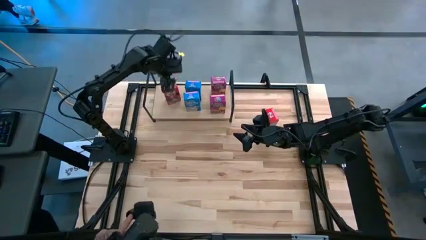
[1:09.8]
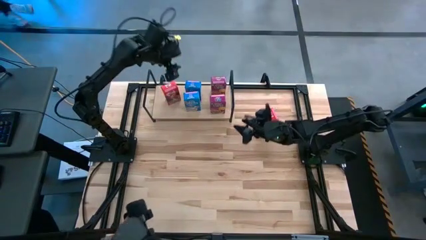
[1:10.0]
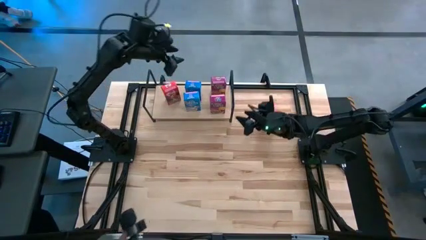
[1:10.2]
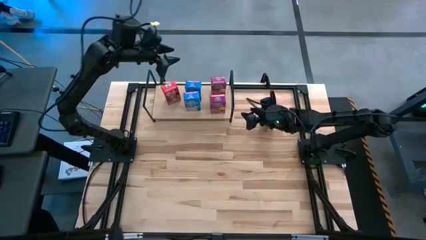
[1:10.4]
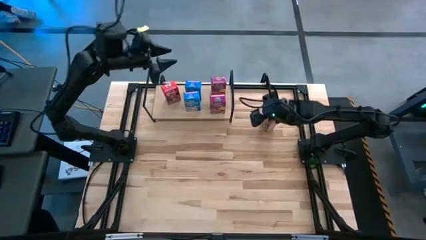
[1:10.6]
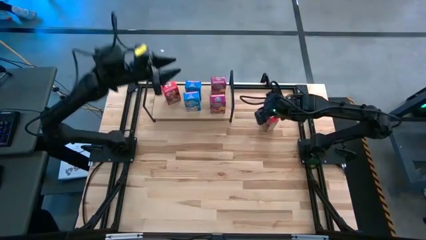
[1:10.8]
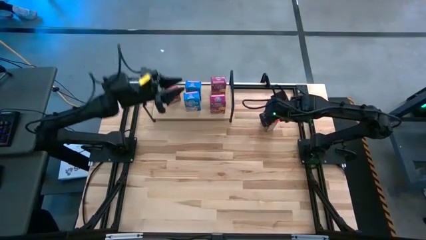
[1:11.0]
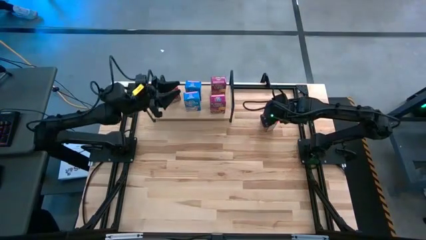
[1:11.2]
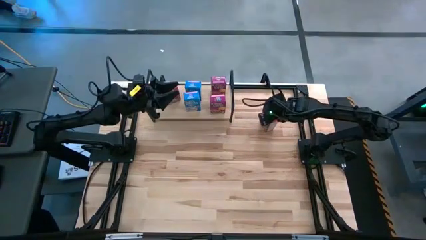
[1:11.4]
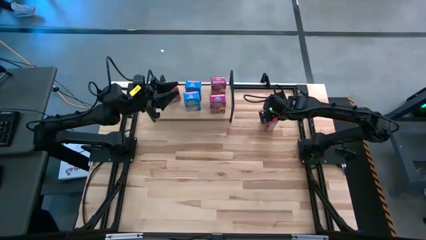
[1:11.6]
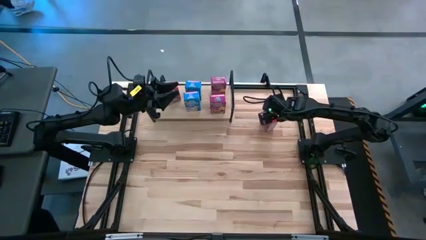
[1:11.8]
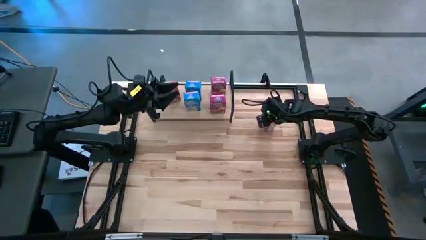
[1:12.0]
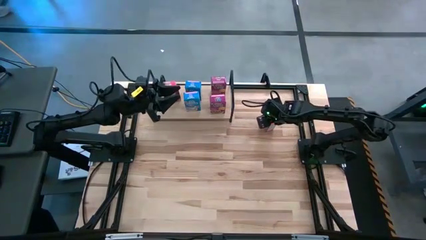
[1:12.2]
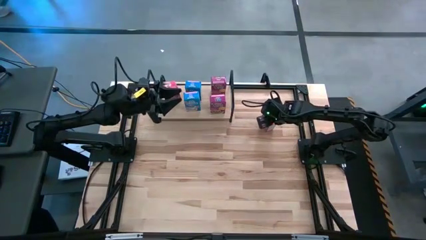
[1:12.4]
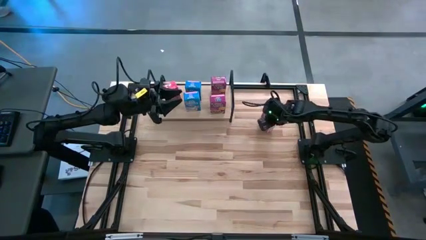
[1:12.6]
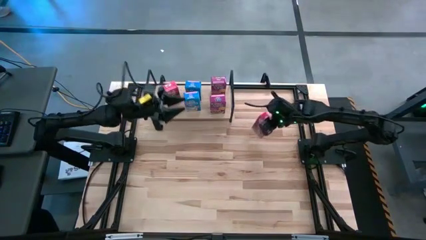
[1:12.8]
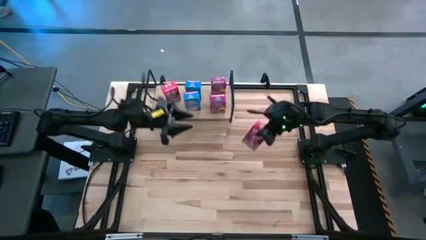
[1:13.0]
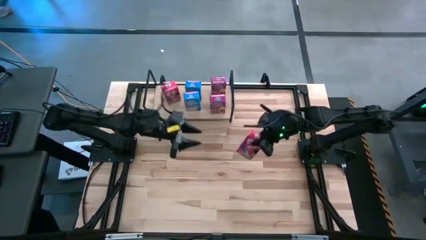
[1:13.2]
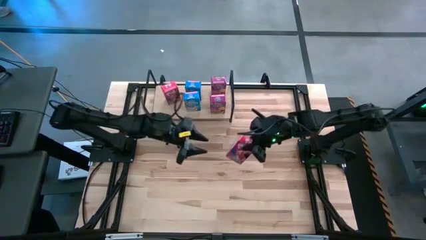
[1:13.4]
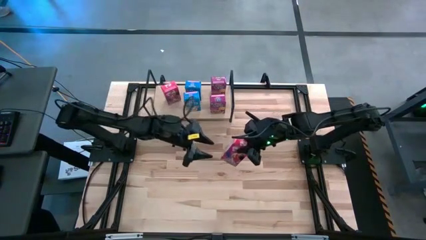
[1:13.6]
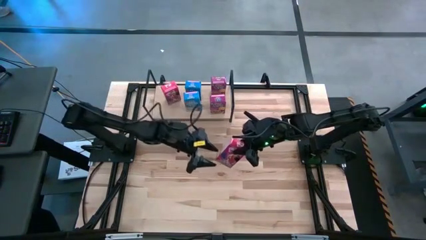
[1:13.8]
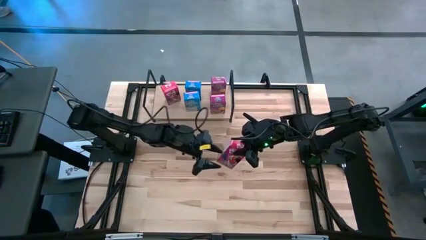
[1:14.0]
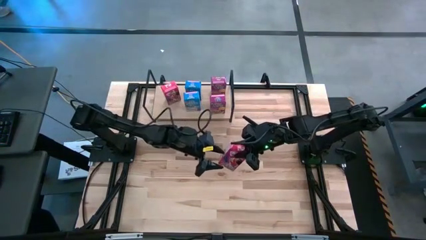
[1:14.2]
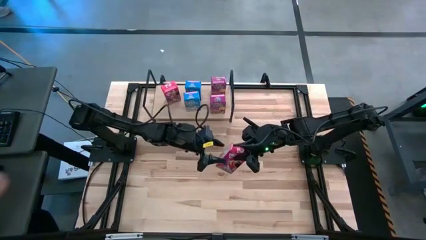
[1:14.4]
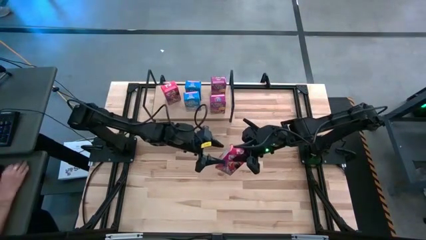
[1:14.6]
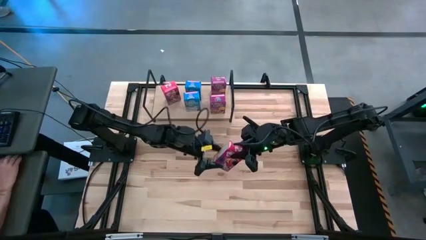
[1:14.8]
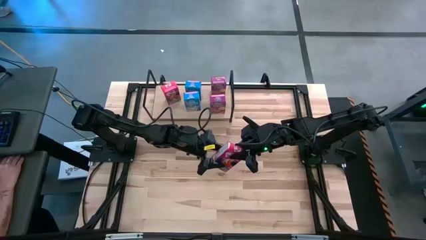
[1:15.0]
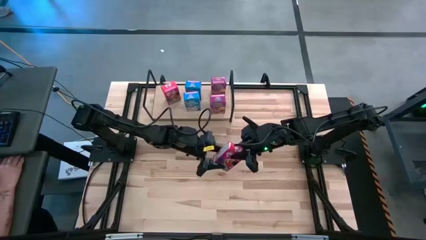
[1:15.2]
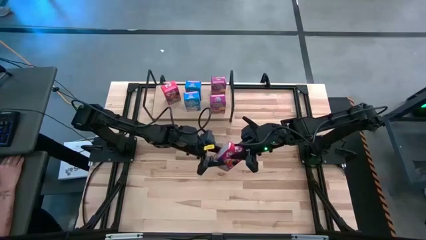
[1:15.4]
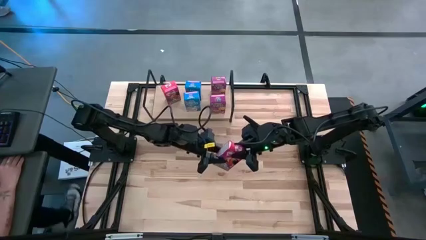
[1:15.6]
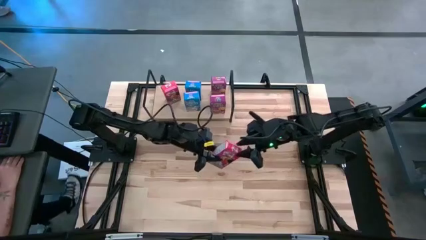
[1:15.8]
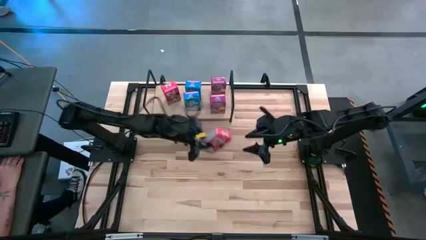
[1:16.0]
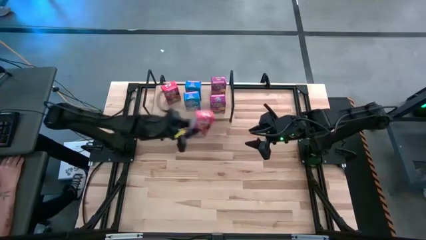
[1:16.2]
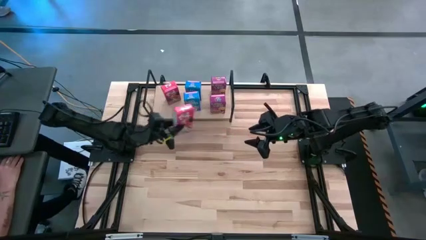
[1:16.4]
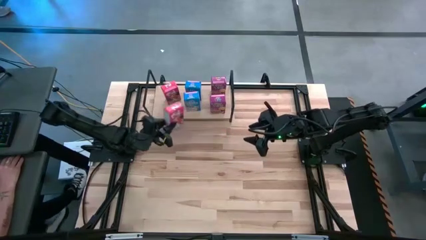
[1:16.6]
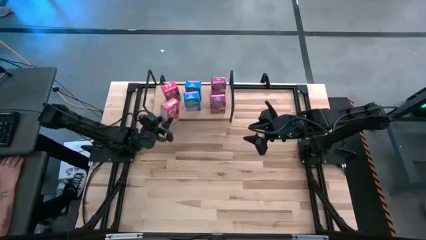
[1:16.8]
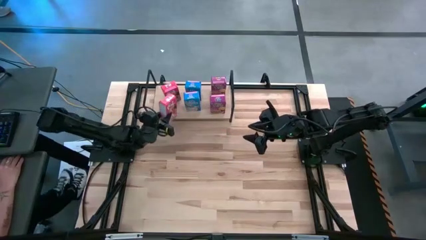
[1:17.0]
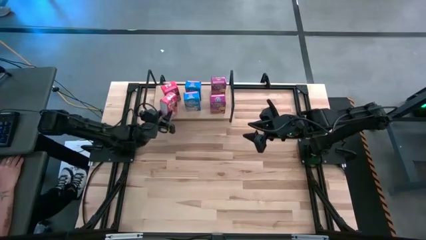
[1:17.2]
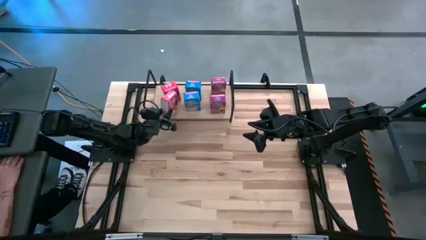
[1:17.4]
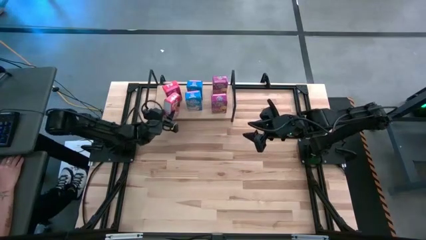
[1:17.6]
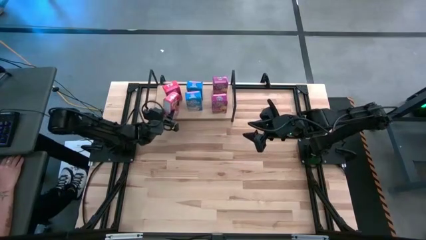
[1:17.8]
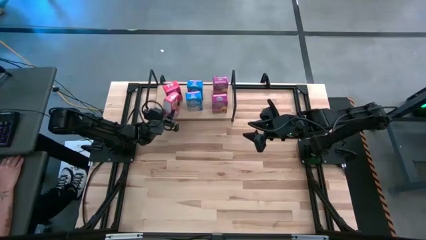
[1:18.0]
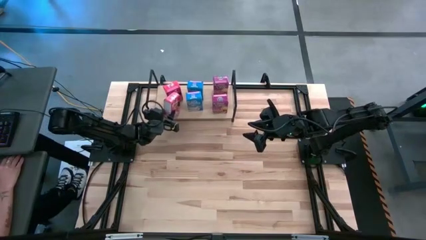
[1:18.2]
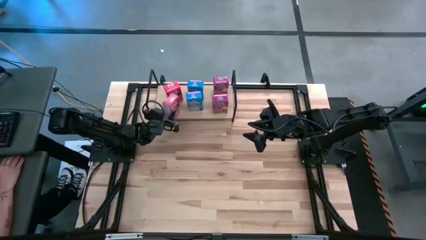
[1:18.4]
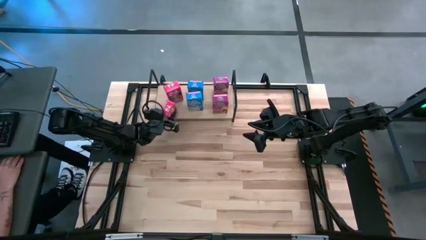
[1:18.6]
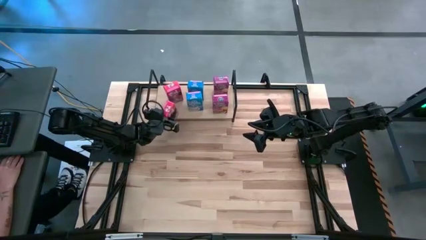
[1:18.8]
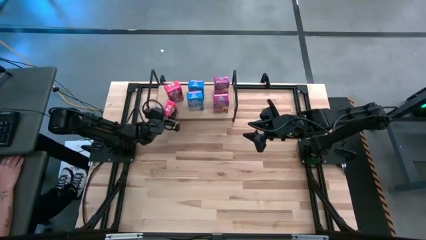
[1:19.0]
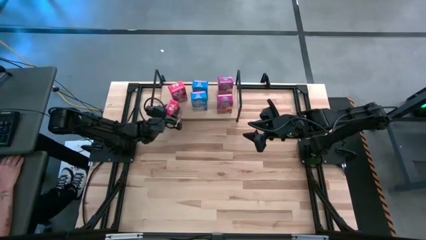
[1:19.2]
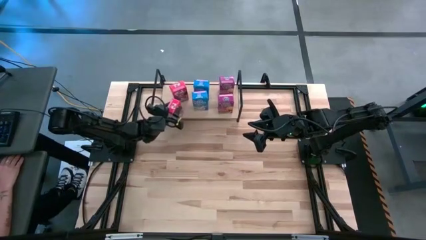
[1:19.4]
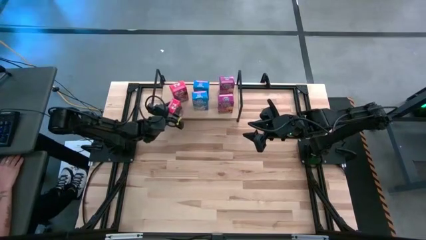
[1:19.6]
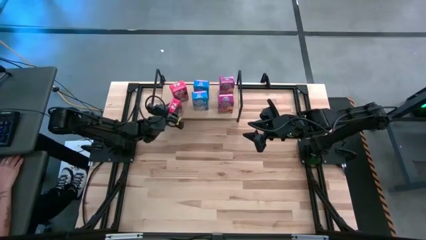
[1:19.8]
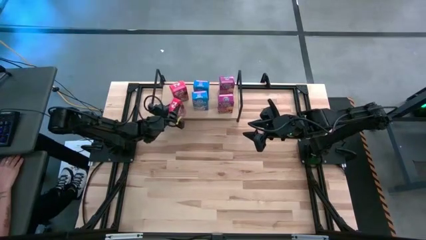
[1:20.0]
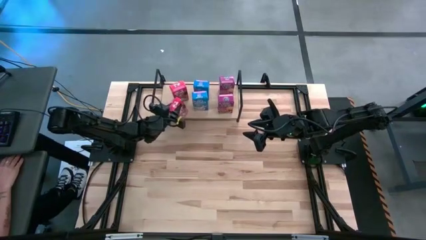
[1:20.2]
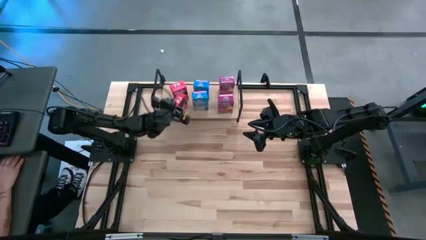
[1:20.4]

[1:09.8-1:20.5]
Task: Stack cereal on shelf
Put the red cereal box on the shelf aligned with the other red cereal box
